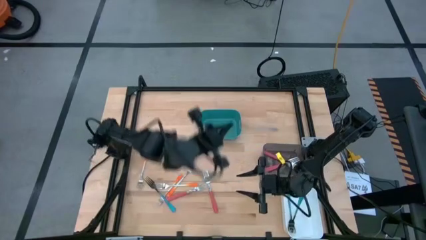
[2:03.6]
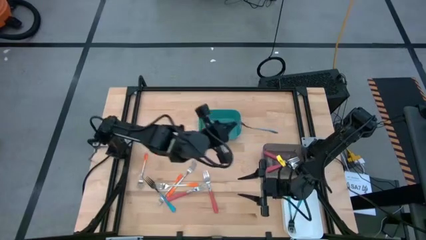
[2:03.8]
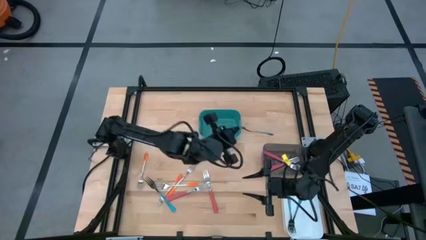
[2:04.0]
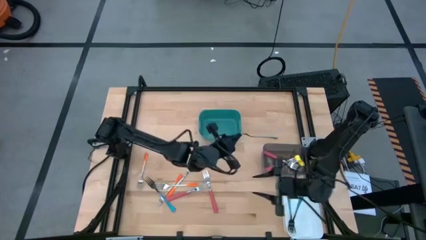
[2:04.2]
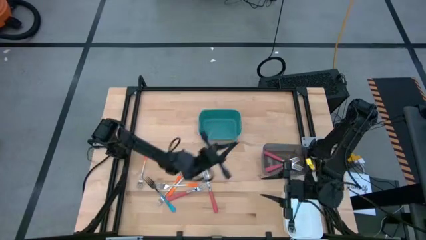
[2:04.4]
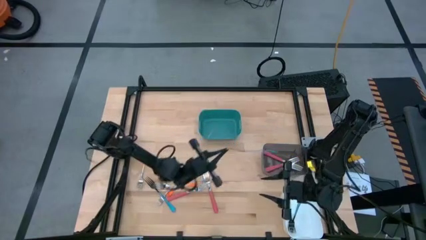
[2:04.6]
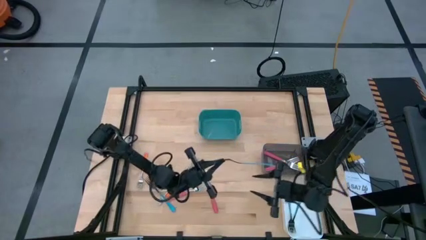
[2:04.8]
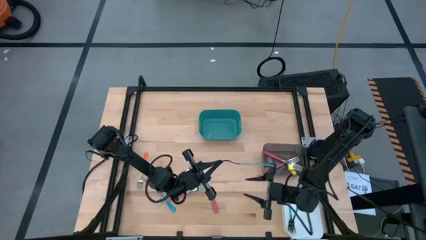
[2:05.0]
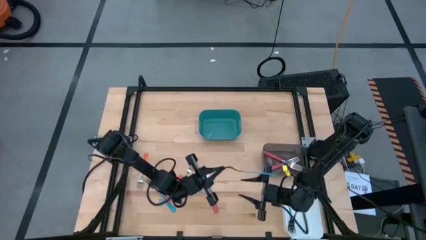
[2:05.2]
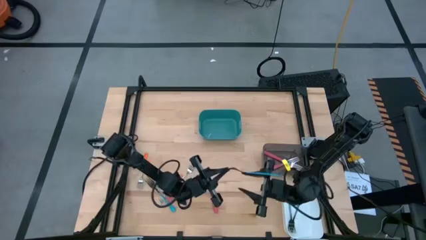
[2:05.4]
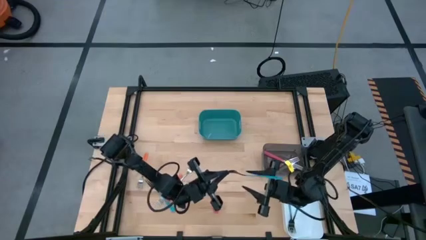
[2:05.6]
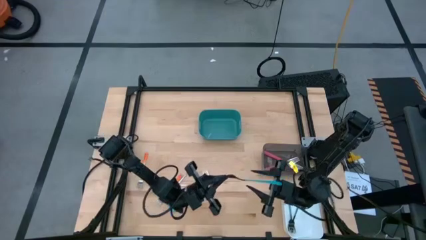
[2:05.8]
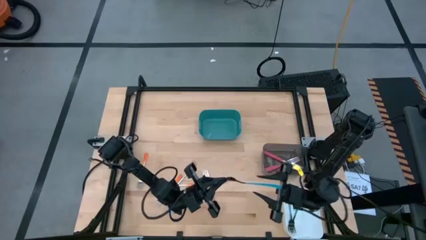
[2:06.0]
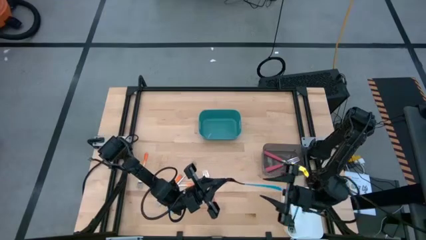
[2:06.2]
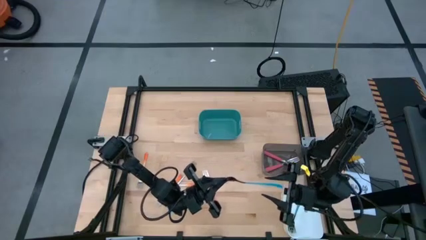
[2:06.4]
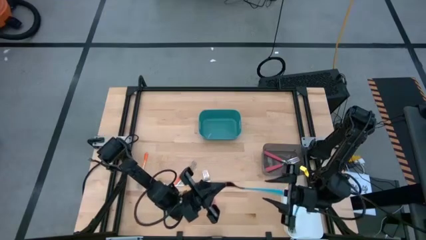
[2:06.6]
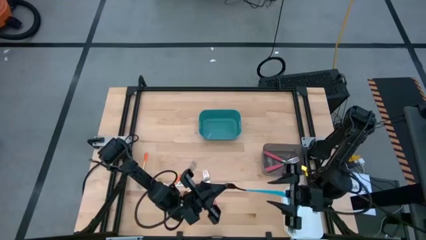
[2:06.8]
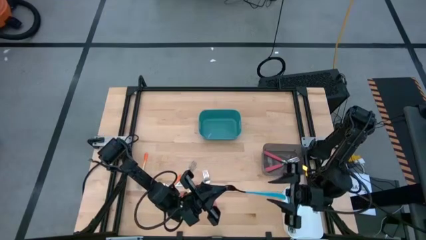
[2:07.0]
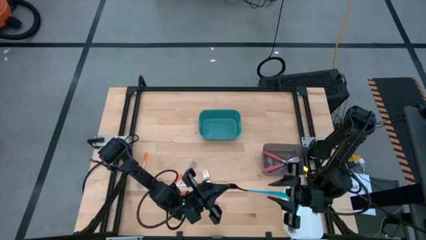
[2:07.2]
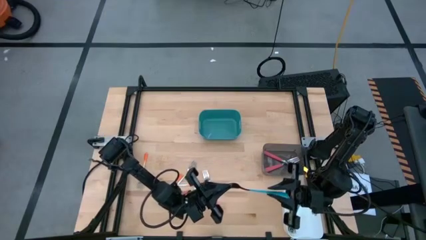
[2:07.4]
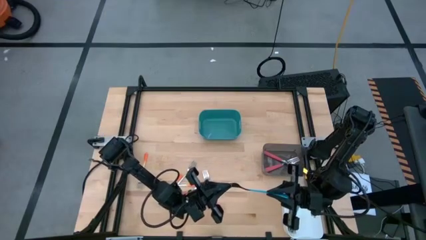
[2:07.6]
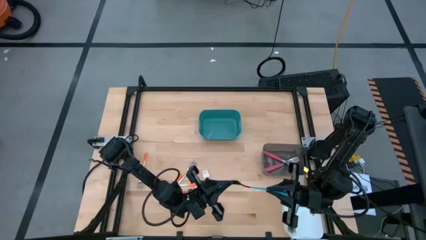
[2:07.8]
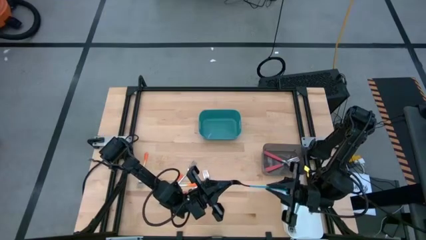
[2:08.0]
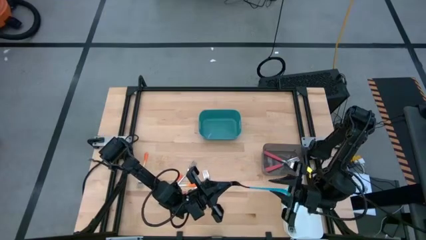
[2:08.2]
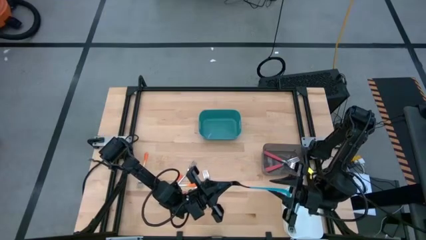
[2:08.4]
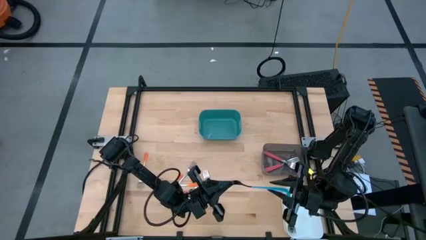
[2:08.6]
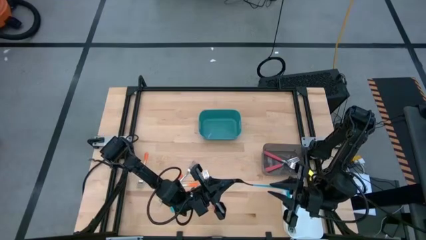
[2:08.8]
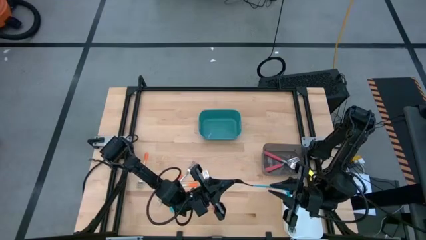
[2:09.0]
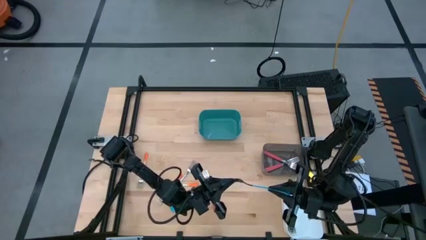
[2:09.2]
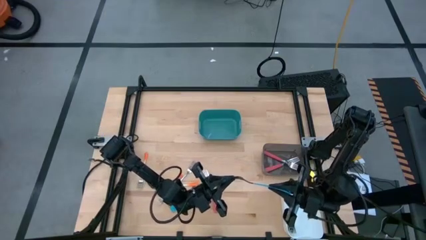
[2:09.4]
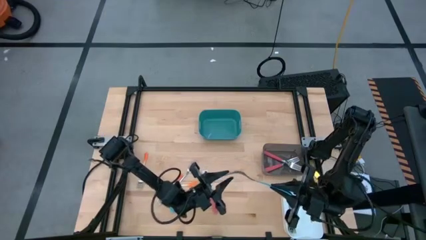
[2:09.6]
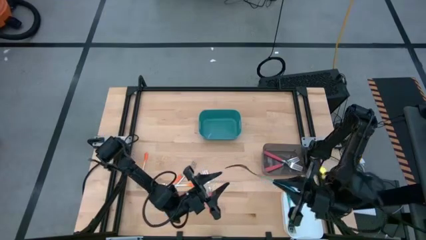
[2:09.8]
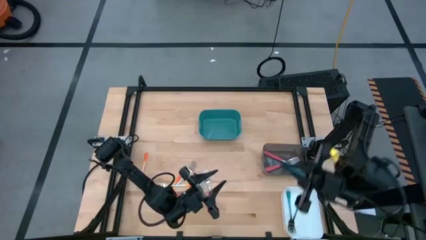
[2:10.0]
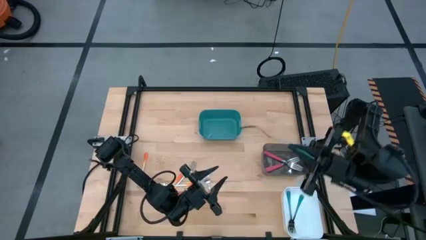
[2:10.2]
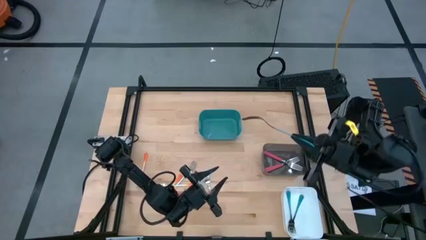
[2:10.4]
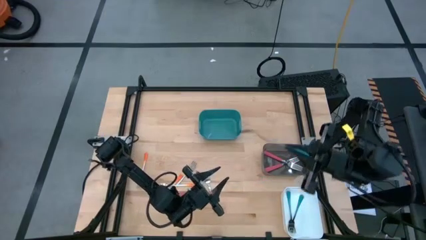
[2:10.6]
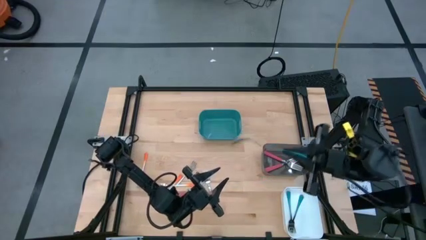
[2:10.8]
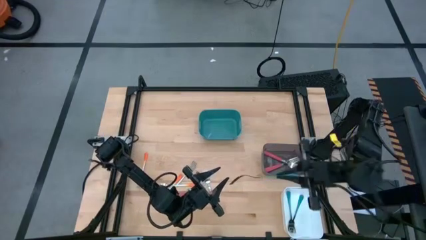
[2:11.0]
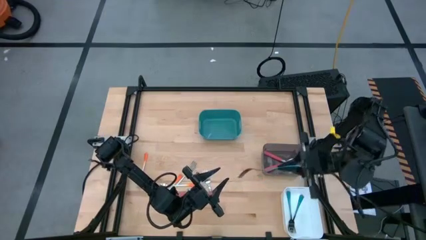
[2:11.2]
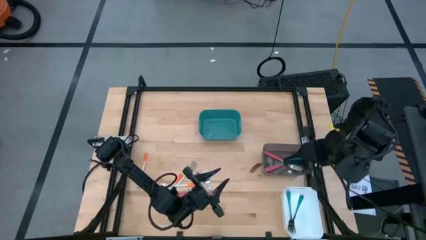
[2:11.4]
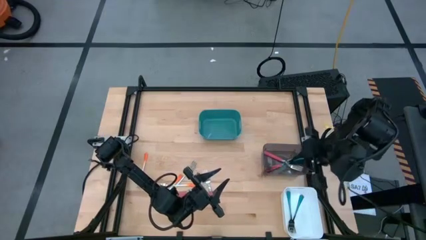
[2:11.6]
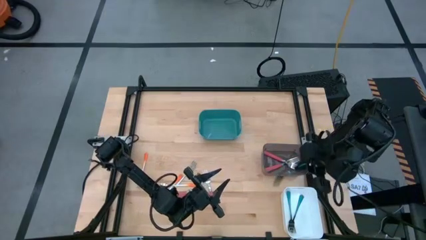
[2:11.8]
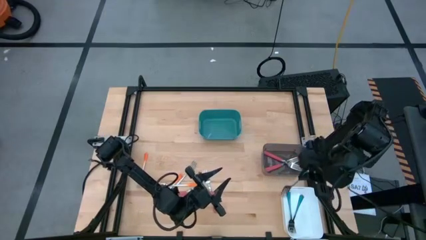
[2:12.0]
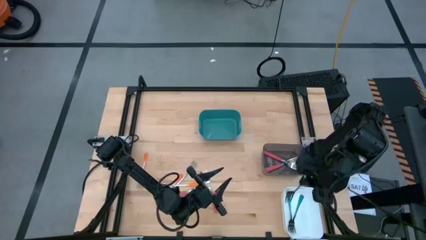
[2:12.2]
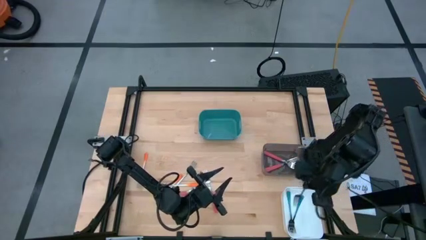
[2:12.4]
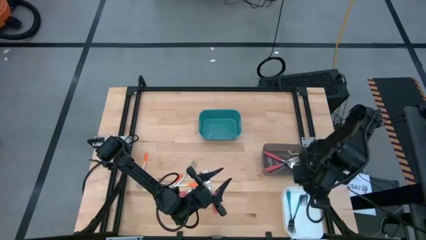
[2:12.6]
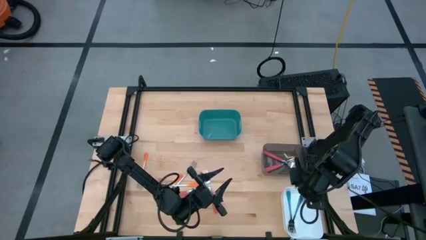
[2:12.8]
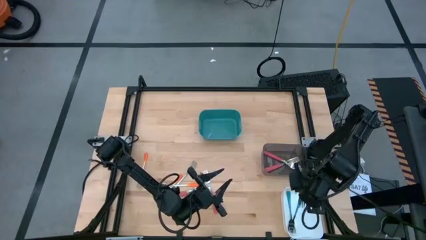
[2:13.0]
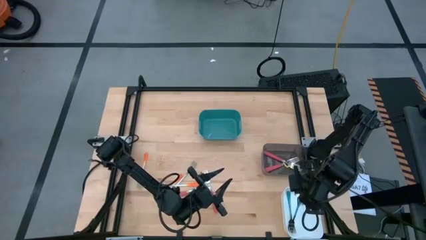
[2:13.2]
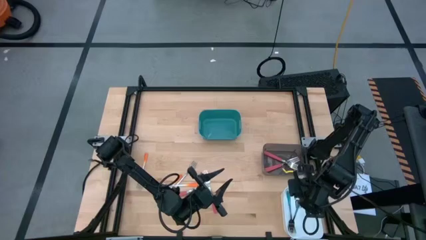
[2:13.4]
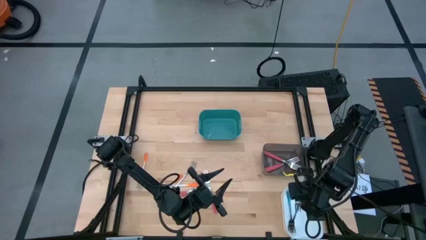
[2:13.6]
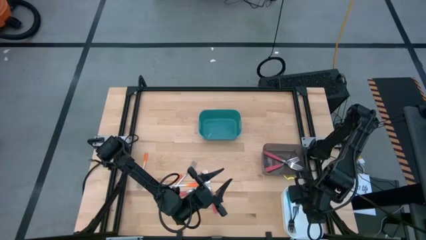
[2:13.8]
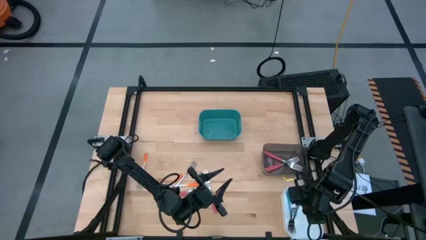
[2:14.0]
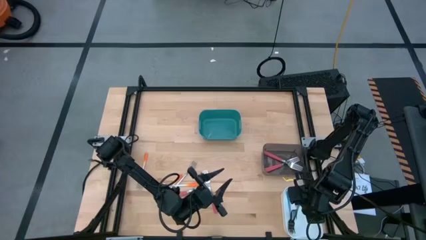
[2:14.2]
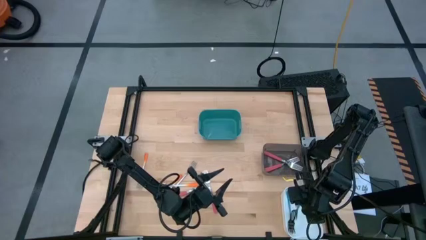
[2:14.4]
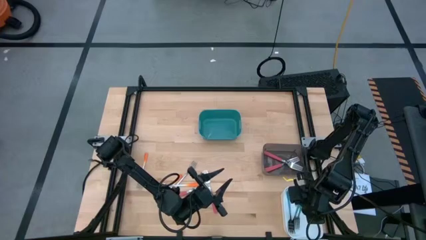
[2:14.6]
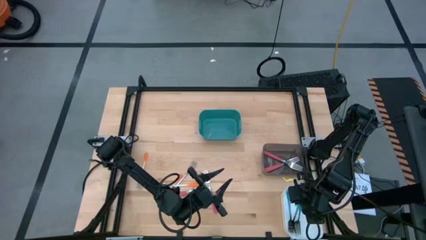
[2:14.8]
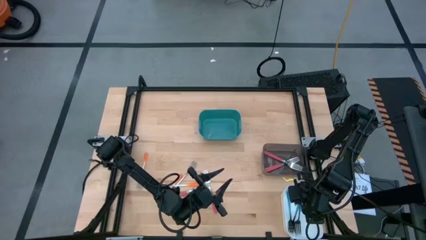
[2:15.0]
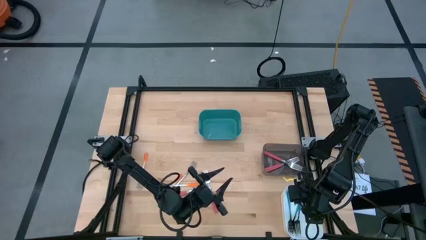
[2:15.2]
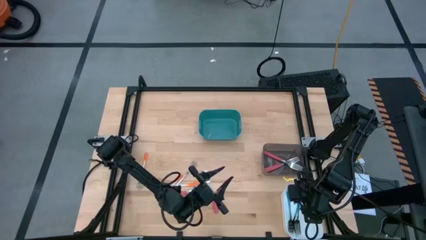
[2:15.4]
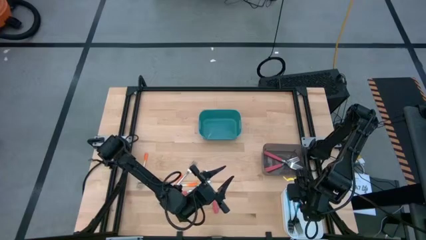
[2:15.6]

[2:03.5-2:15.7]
Task: Sort silverware by color (type)
Put the blue fork into the white bin

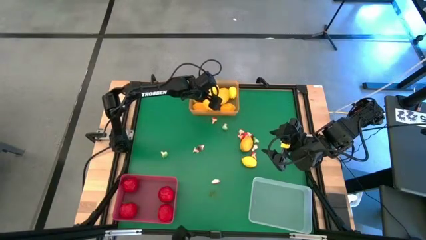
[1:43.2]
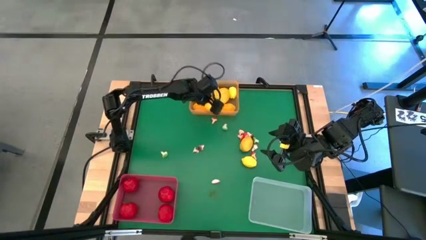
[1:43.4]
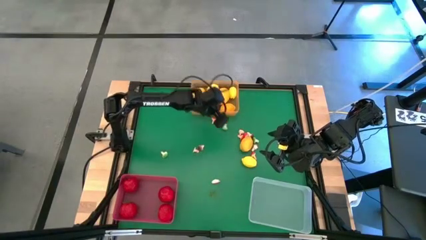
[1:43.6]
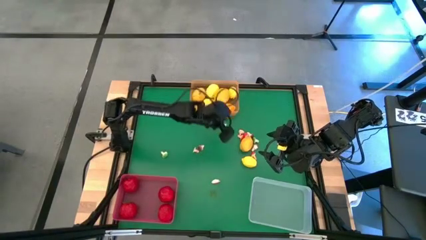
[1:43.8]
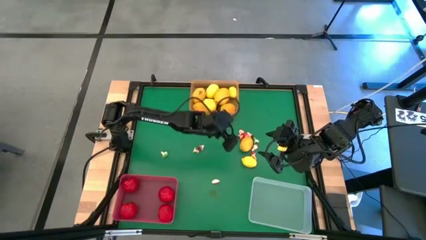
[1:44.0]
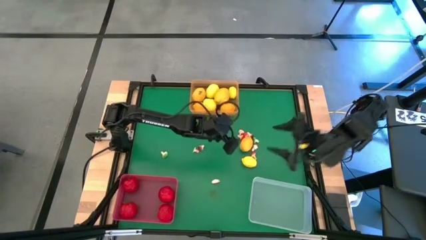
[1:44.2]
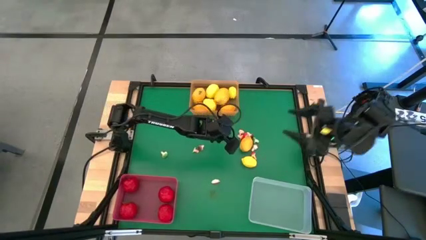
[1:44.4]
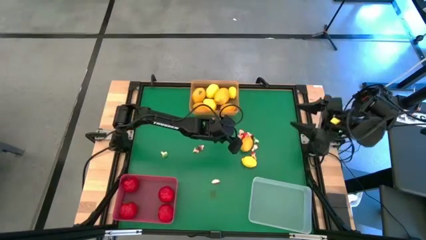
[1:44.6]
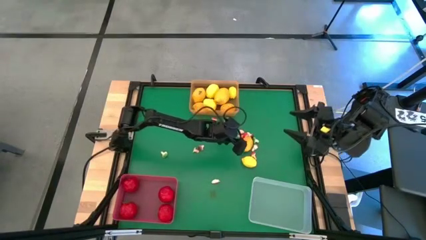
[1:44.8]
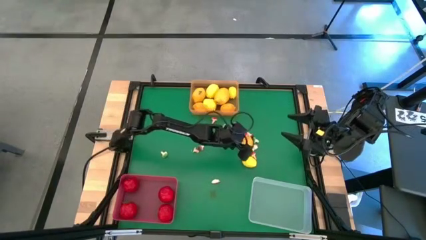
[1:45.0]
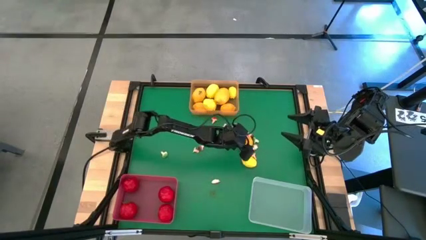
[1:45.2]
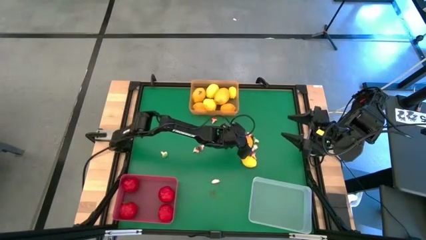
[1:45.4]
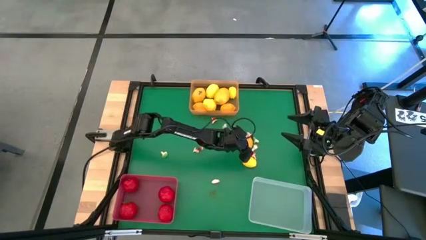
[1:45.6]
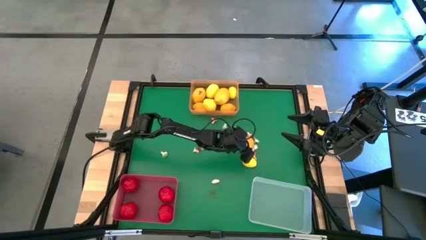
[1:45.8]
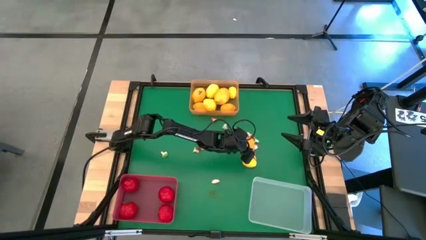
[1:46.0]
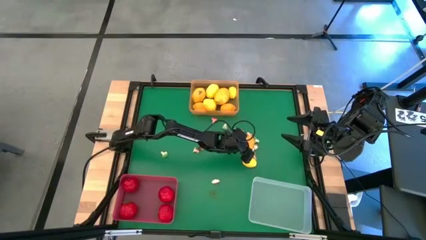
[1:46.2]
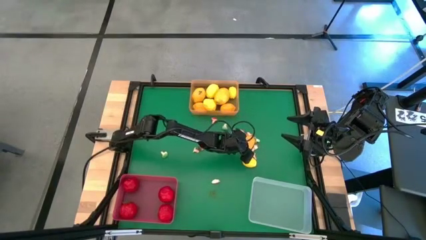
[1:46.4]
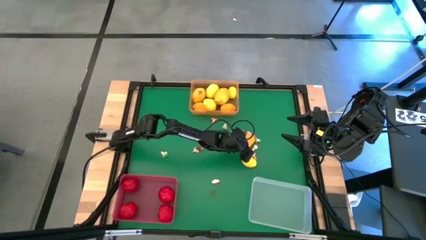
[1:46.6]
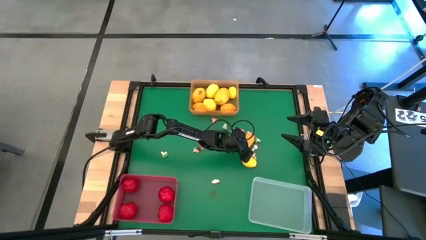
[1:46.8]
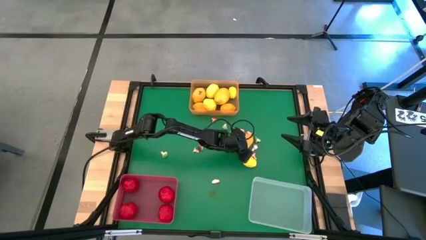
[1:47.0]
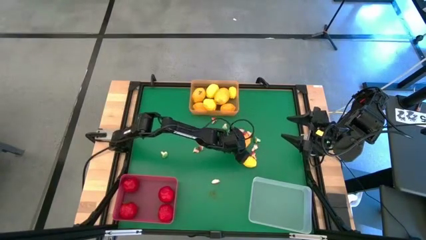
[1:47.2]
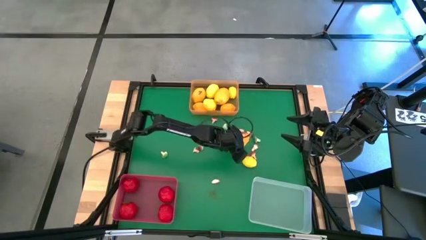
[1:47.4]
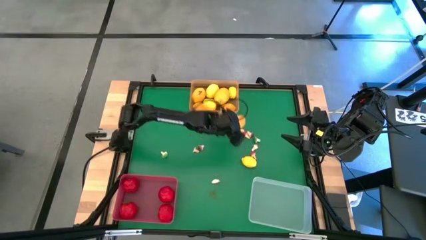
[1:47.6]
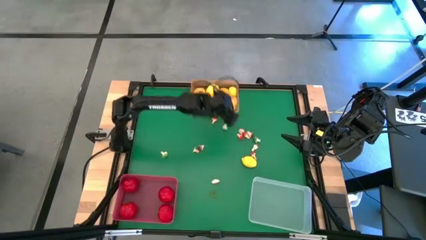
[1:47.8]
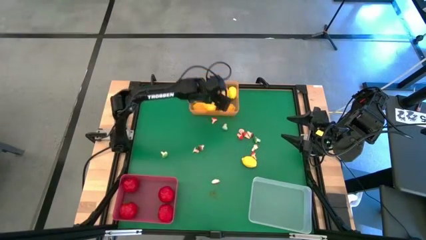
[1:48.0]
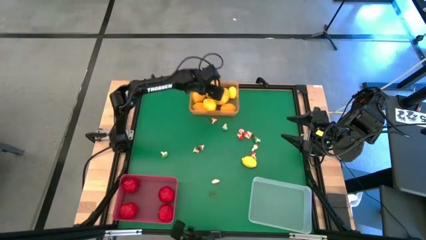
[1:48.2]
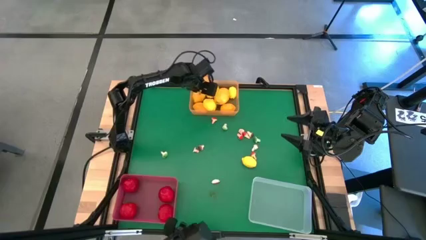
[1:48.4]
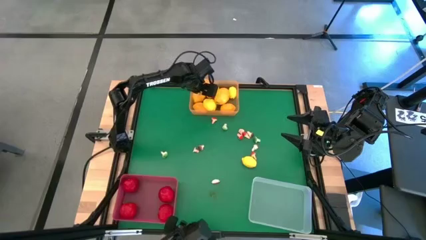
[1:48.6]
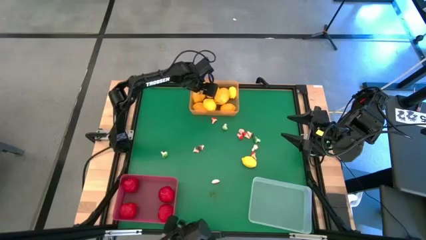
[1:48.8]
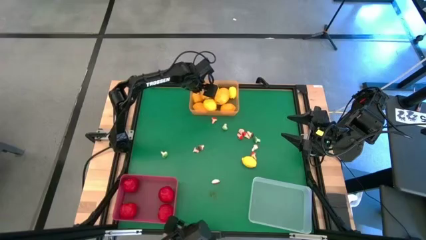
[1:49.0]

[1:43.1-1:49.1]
Task: Sort produce into baskets
Put the mango into the orange bin
